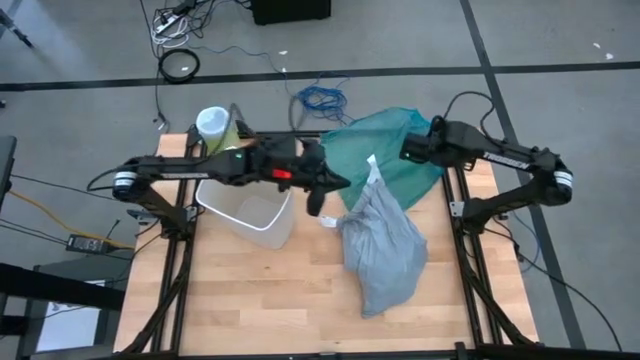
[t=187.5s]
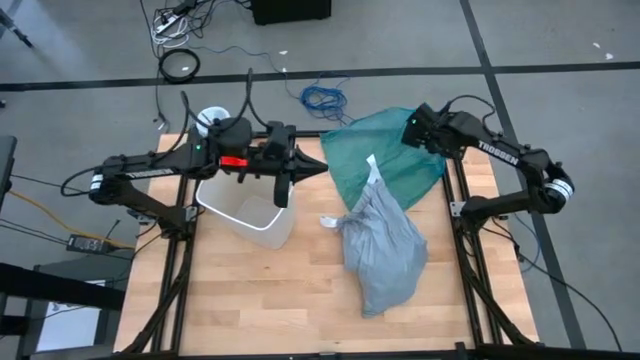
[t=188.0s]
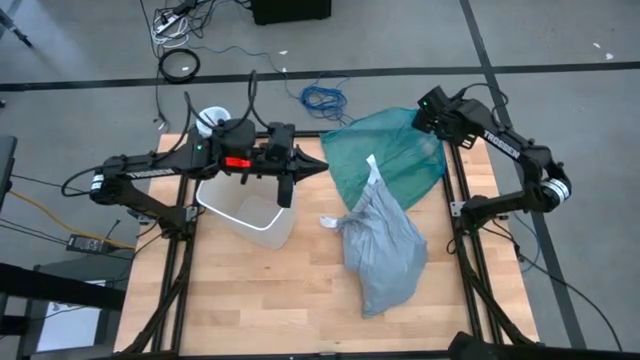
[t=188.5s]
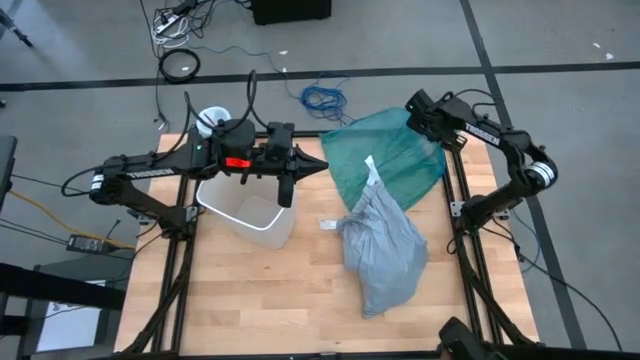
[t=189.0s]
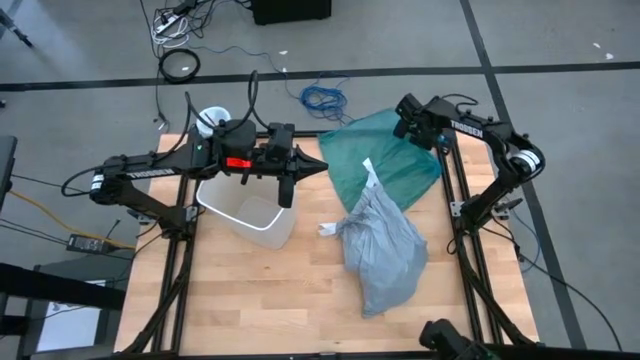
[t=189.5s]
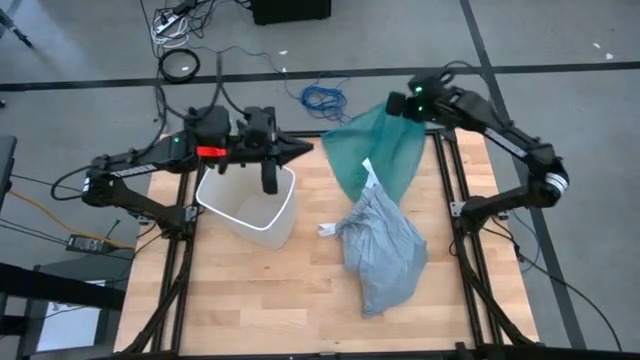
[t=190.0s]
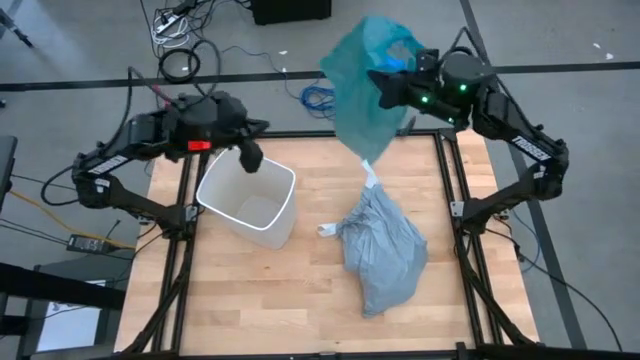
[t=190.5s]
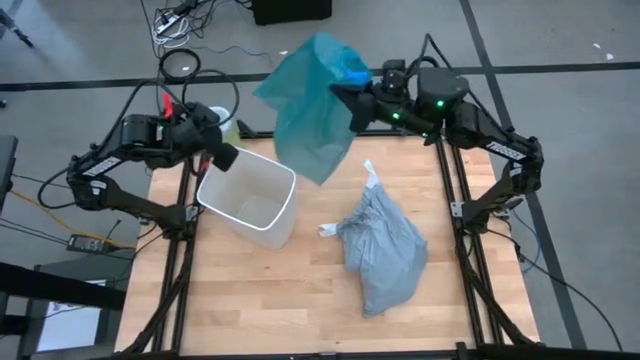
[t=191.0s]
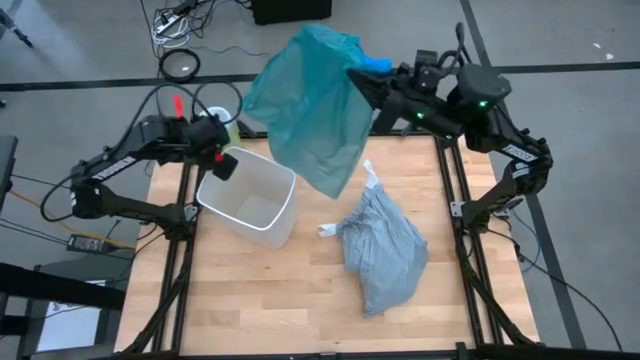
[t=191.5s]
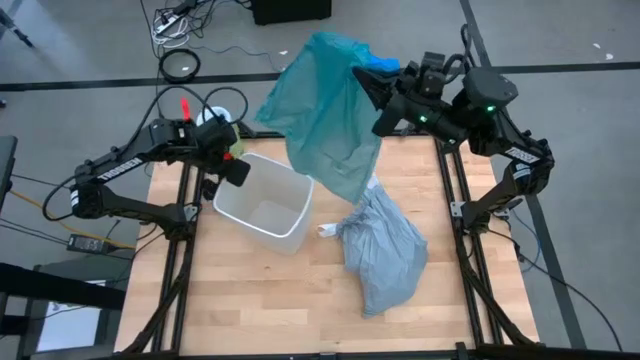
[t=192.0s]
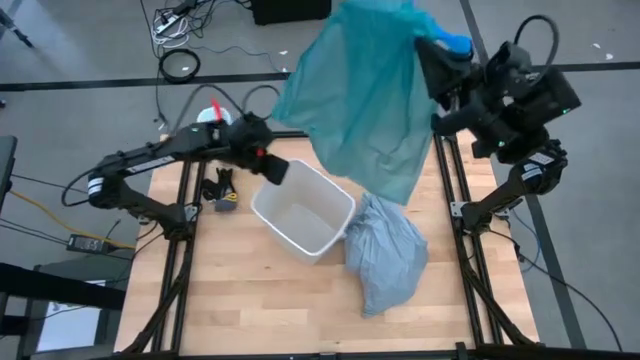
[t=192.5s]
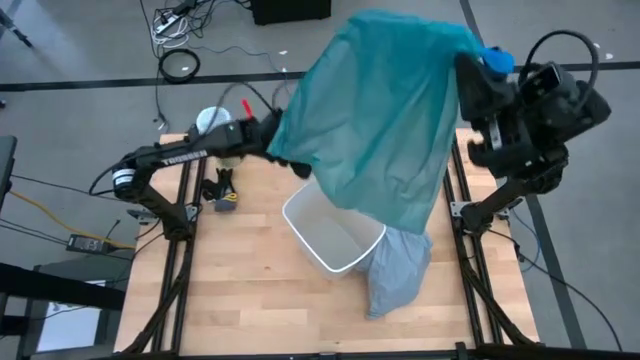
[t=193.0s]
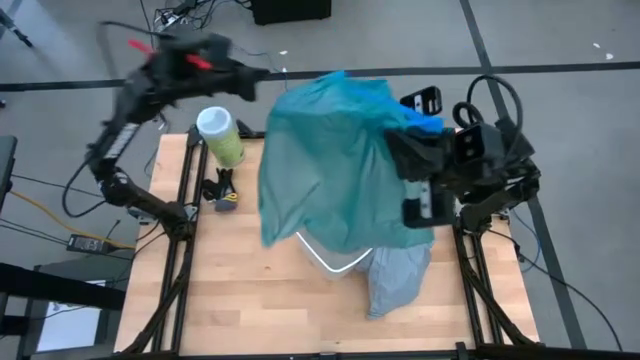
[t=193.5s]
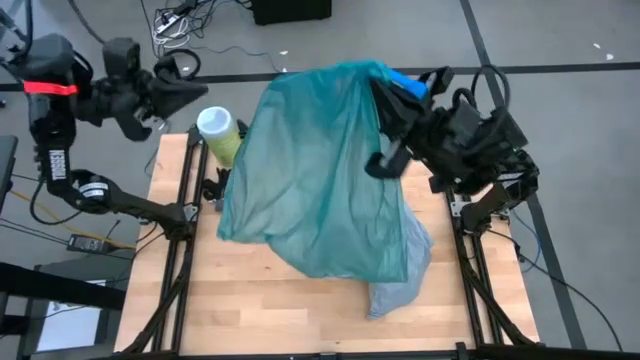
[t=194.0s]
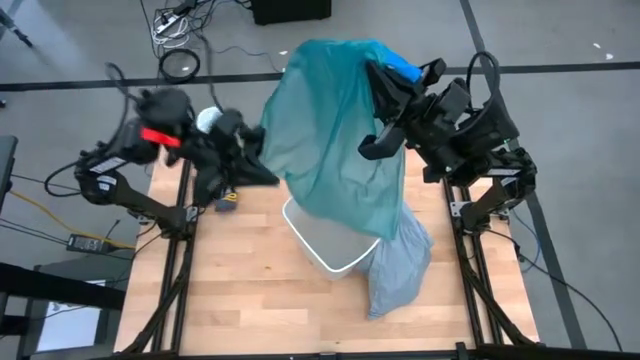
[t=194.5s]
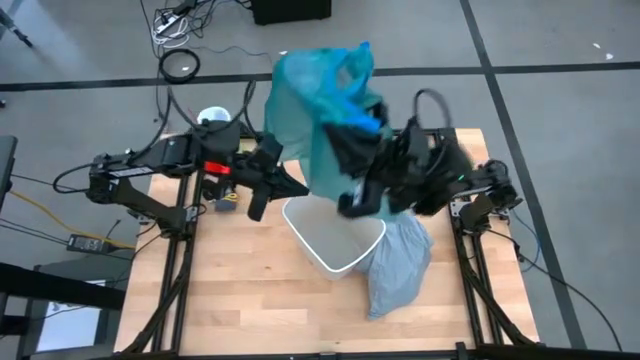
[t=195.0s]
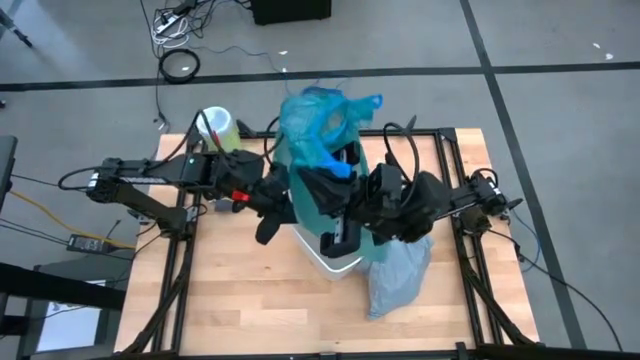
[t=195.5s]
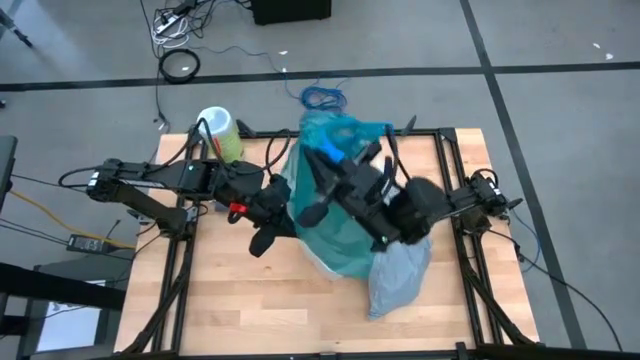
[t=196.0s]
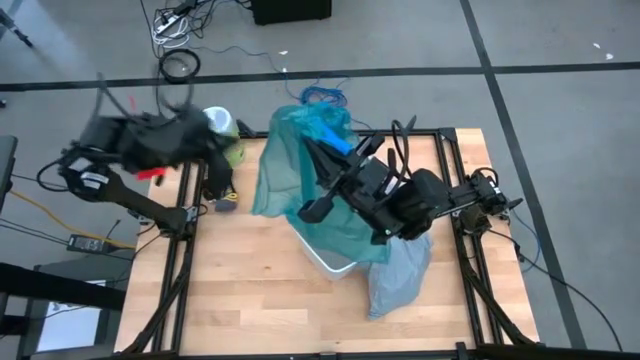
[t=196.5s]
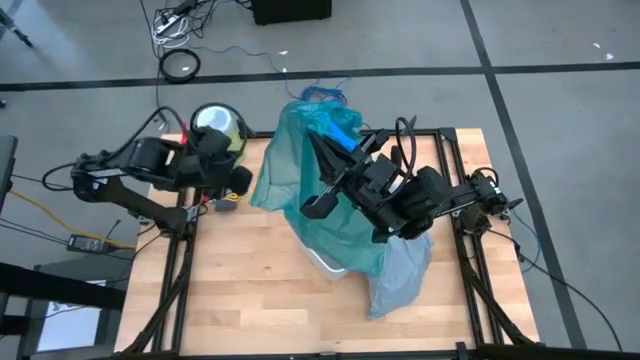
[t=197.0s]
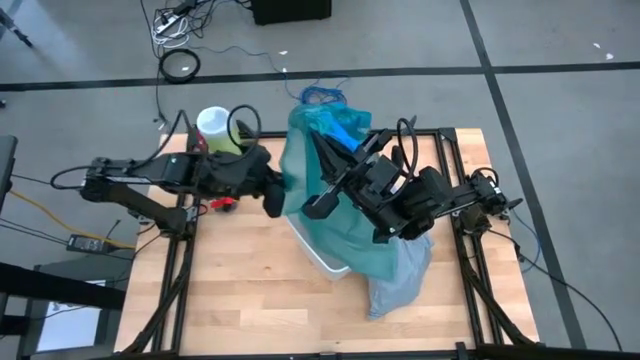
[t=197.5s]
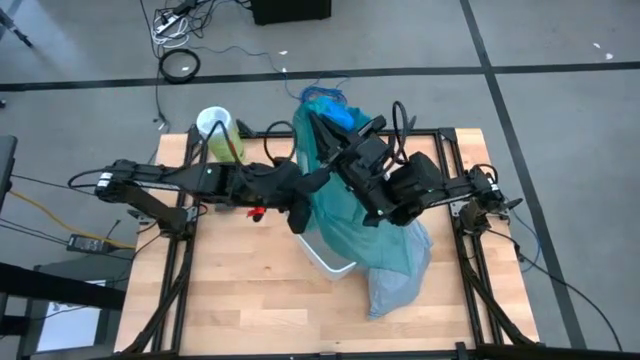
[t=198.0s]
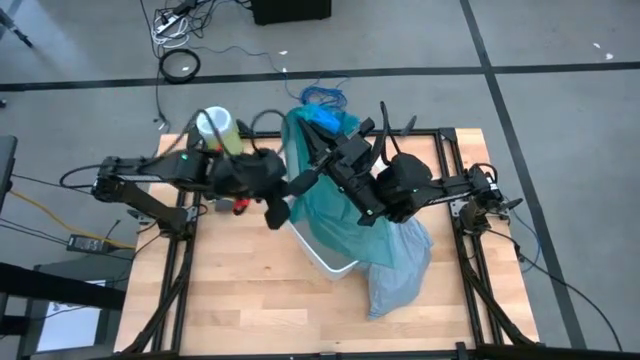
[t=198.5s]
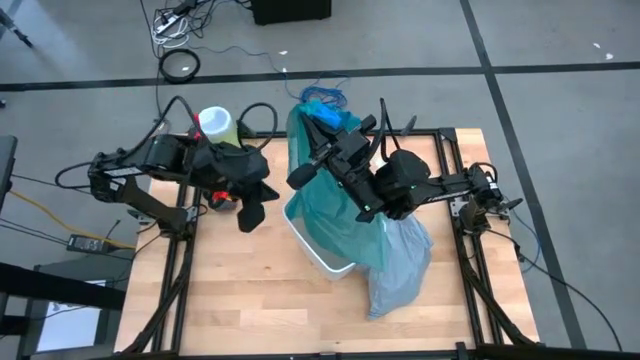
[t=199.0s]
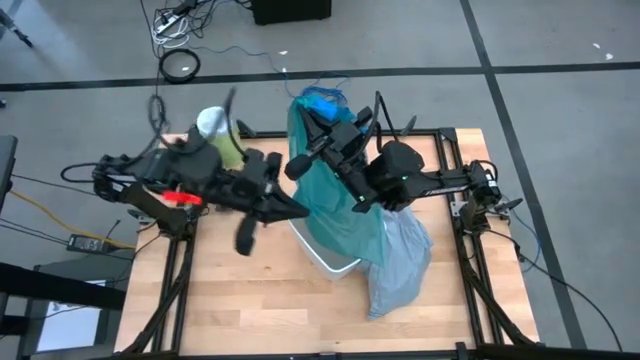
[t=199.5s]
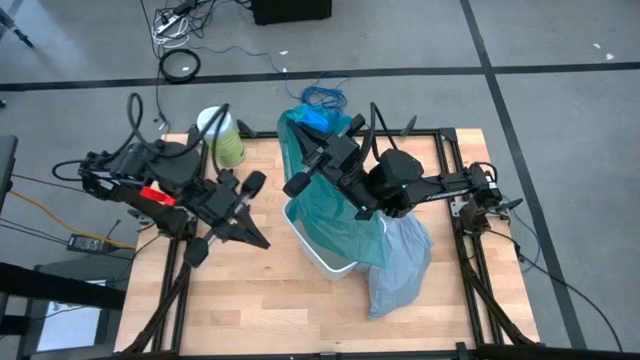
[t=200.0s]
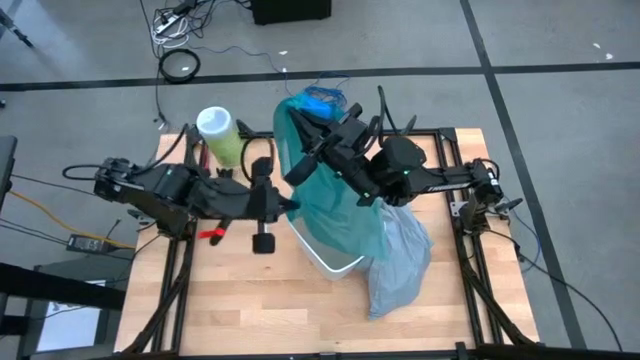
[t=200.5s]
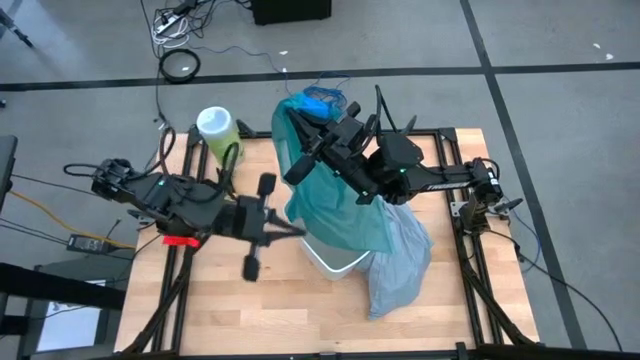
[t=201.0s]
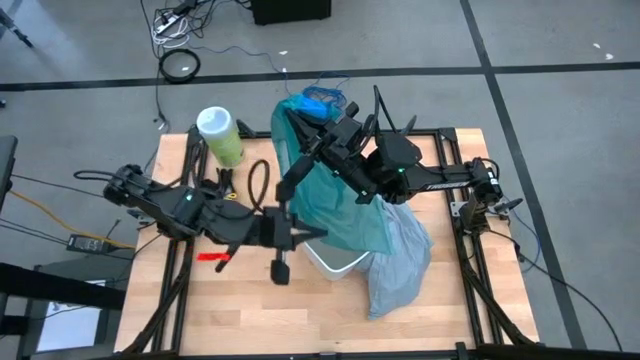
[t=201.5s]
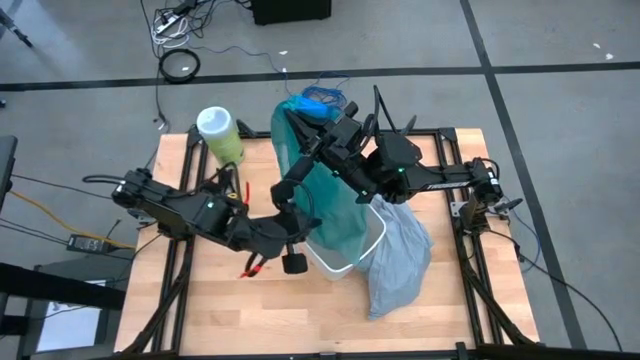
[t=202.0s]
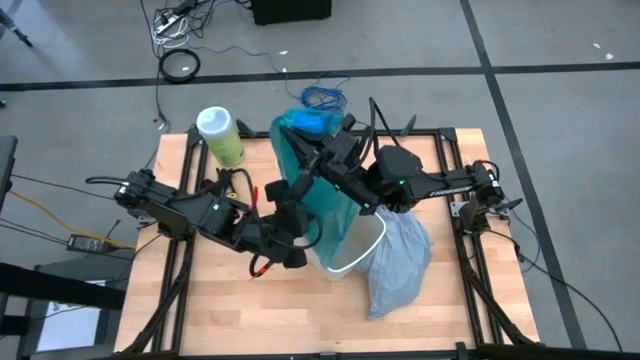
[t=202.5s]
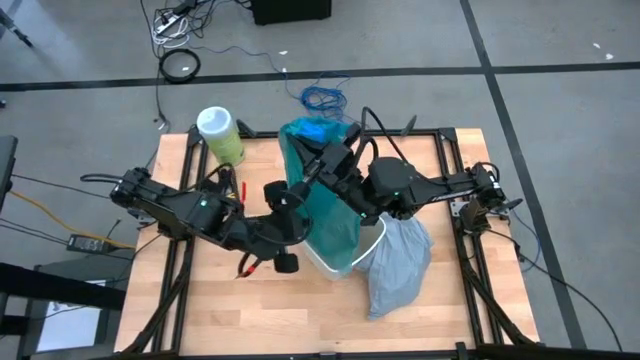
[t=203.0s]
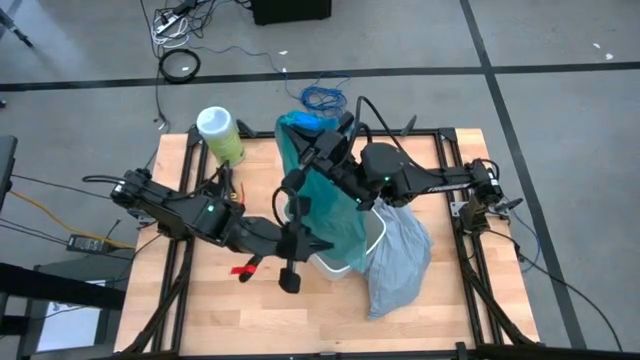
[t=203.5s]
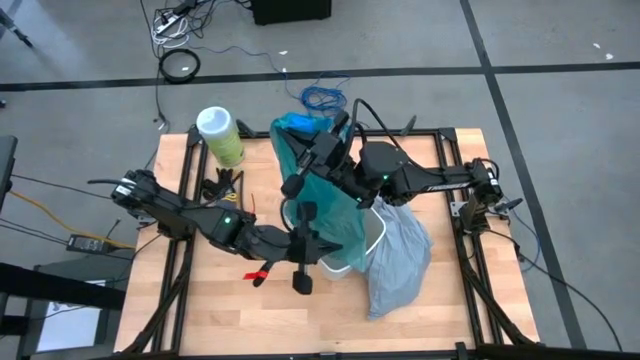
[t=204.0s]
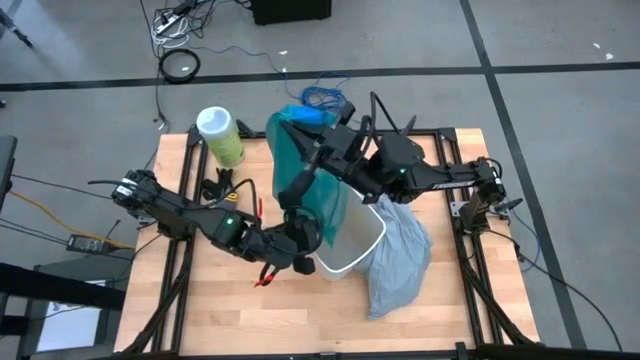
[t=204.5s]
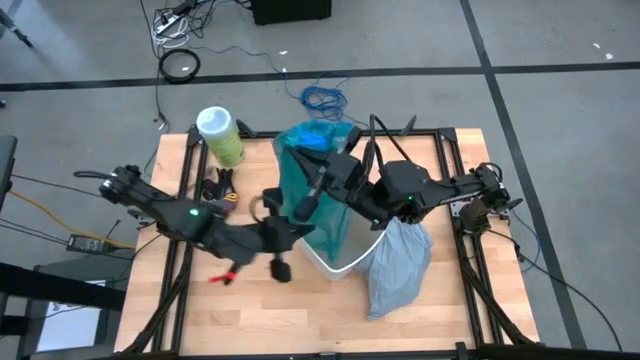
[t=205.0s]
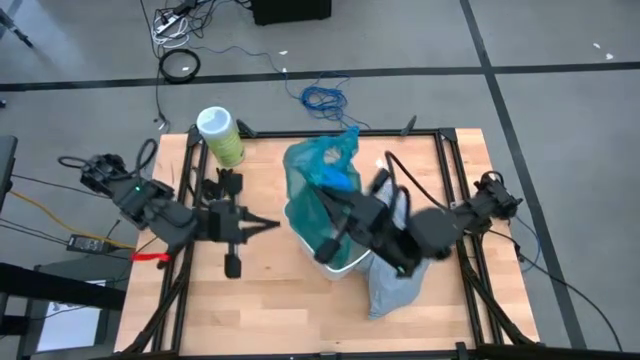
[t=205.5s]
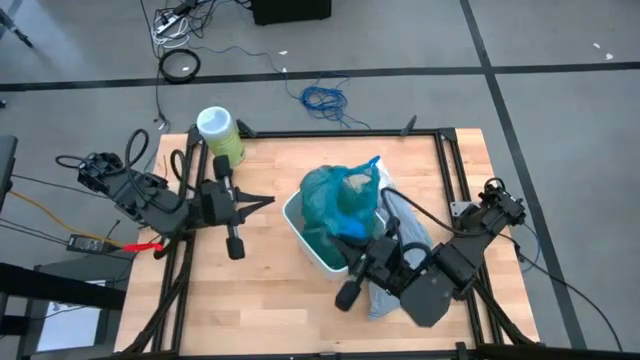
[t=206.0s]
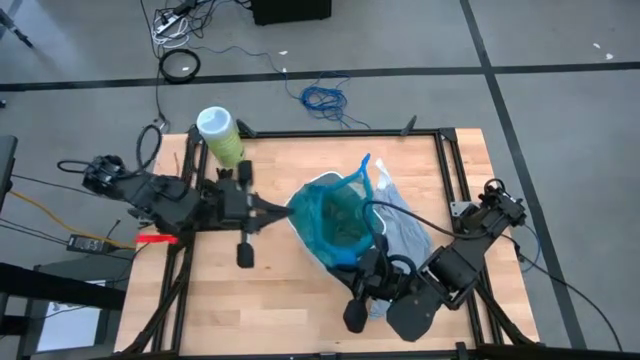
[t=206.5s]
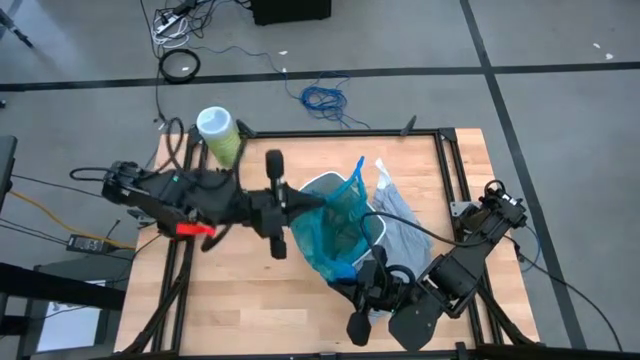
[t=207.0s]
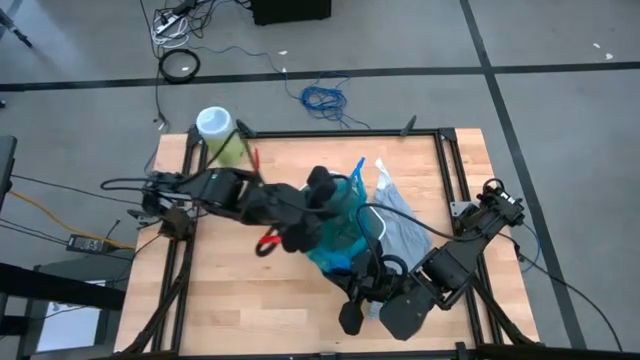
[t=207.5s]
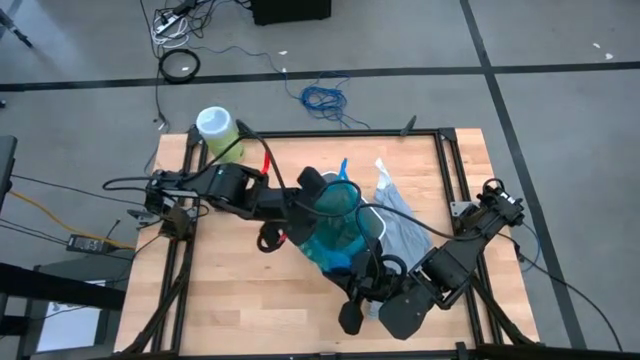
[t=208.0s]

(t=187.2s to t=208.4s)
Task: place trash/remove bag and relplace
Put the new dark blue trash bag into the trash bin
